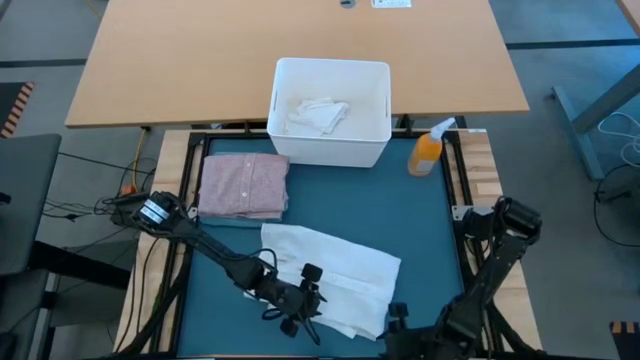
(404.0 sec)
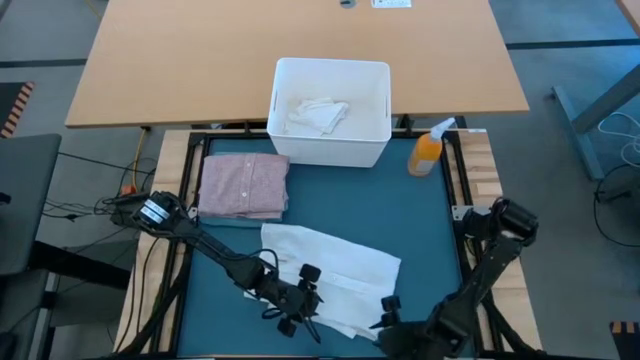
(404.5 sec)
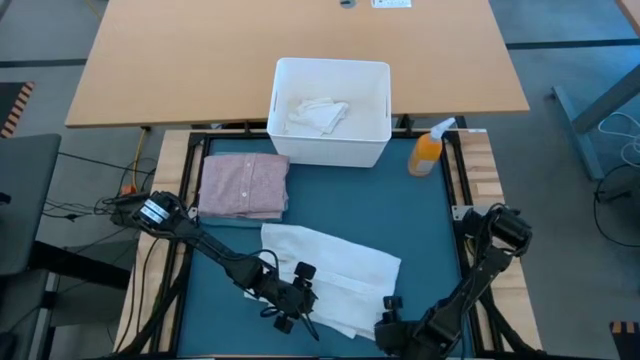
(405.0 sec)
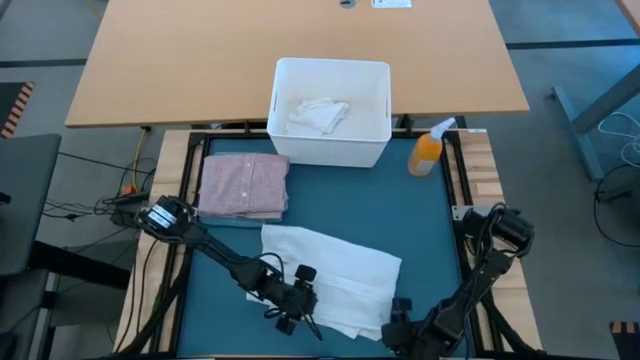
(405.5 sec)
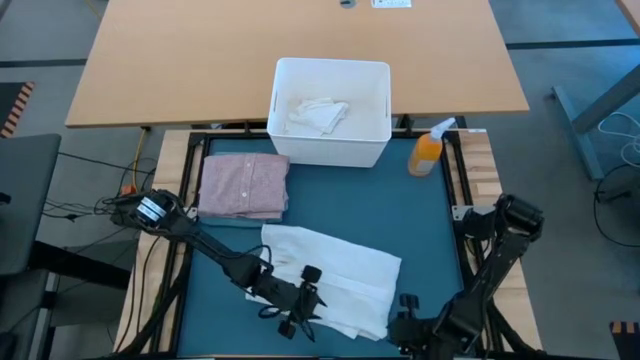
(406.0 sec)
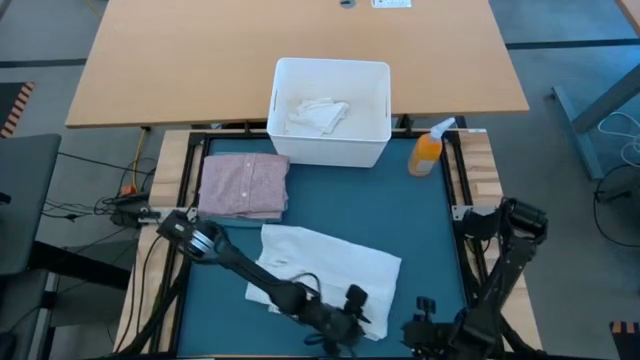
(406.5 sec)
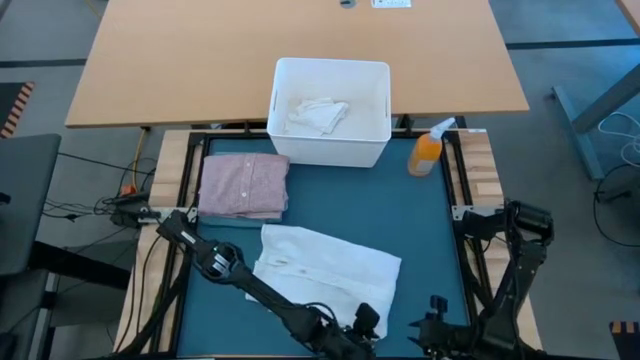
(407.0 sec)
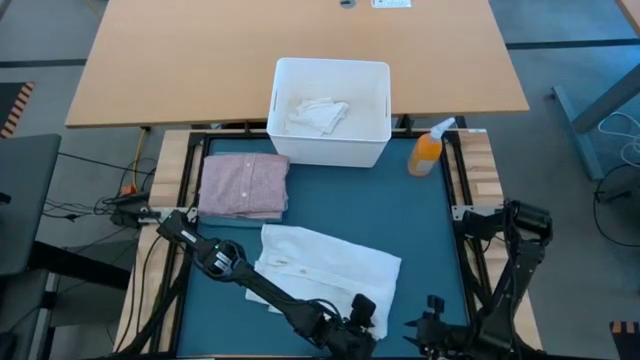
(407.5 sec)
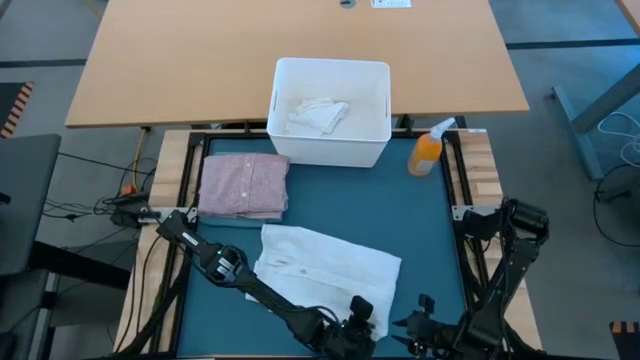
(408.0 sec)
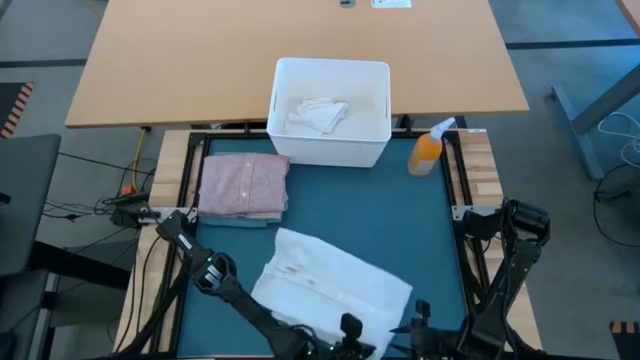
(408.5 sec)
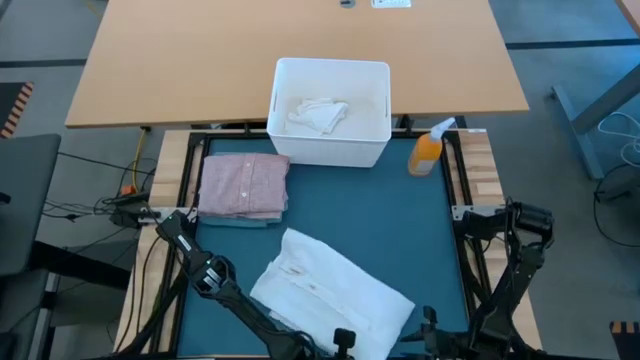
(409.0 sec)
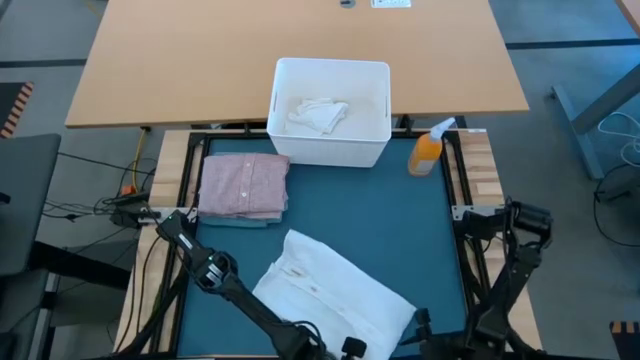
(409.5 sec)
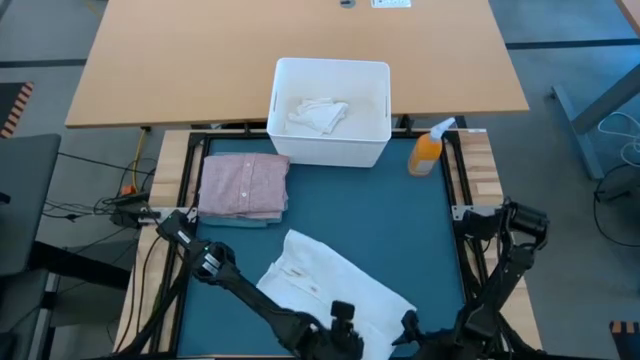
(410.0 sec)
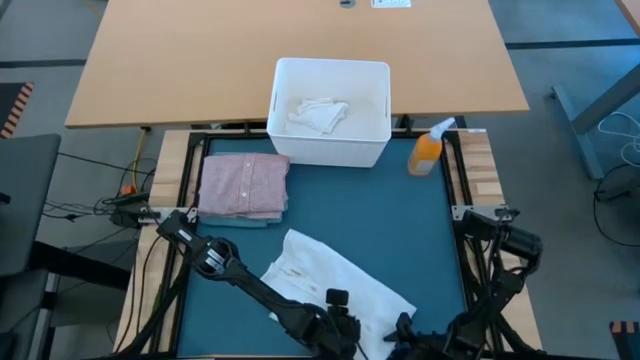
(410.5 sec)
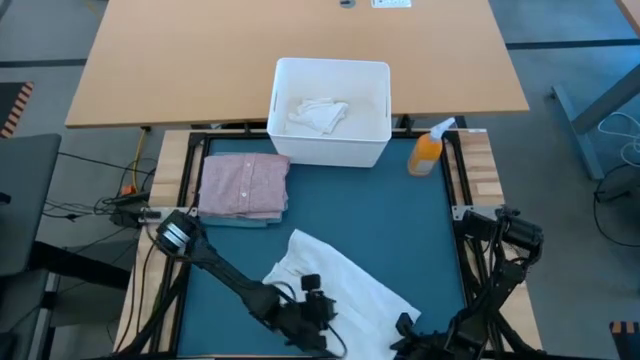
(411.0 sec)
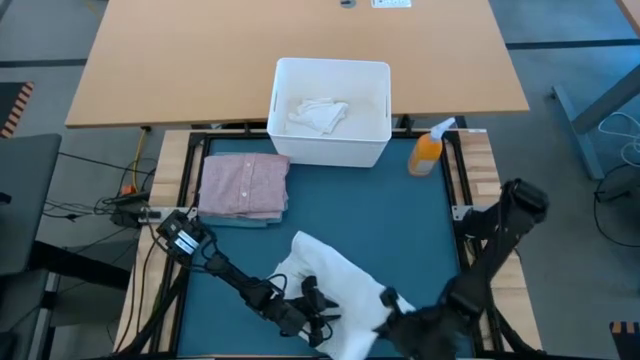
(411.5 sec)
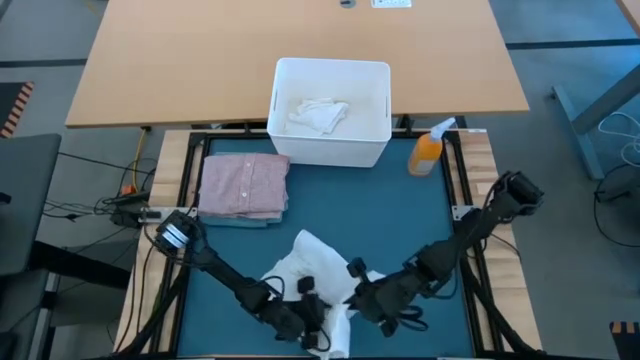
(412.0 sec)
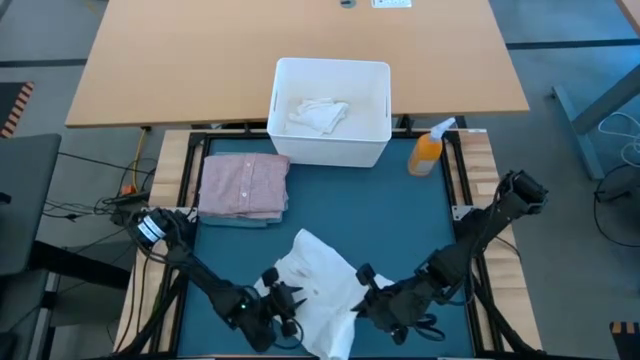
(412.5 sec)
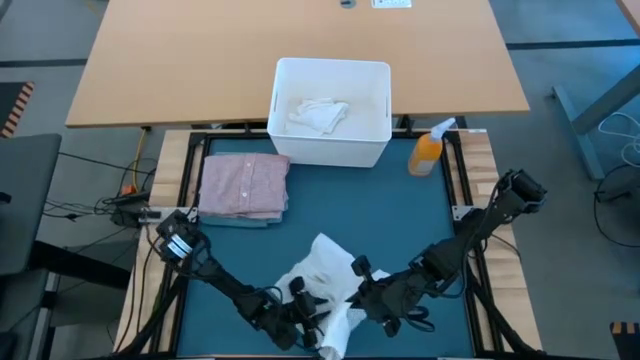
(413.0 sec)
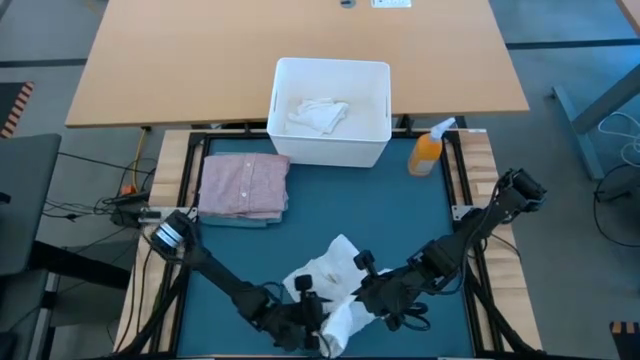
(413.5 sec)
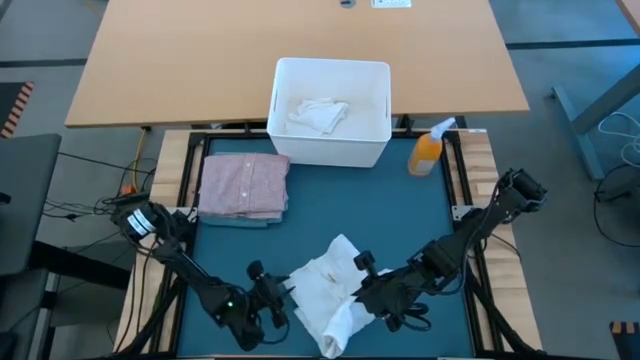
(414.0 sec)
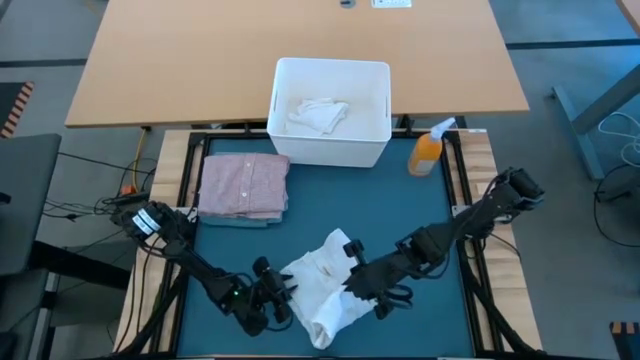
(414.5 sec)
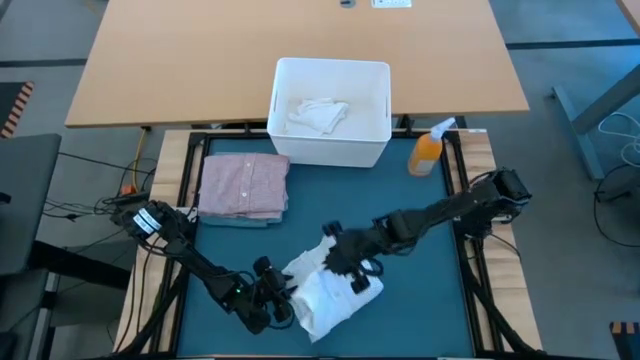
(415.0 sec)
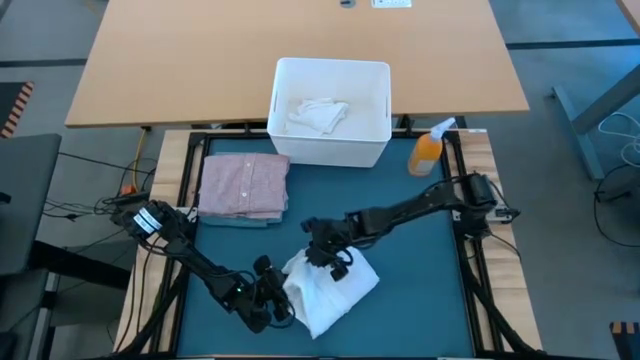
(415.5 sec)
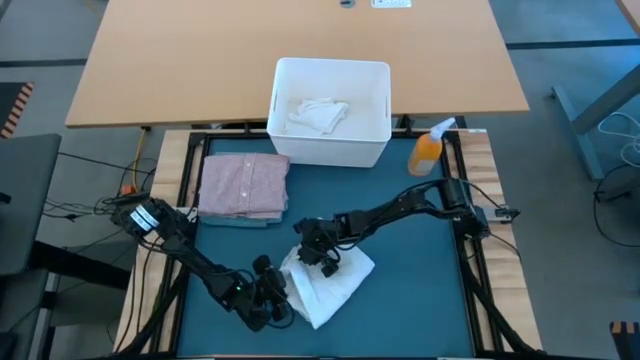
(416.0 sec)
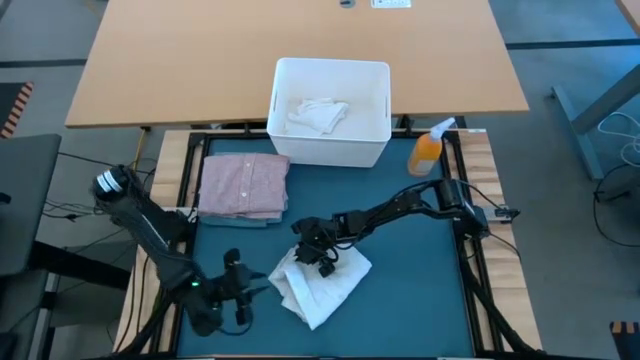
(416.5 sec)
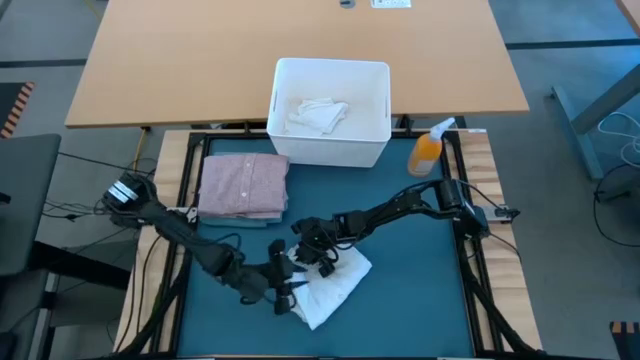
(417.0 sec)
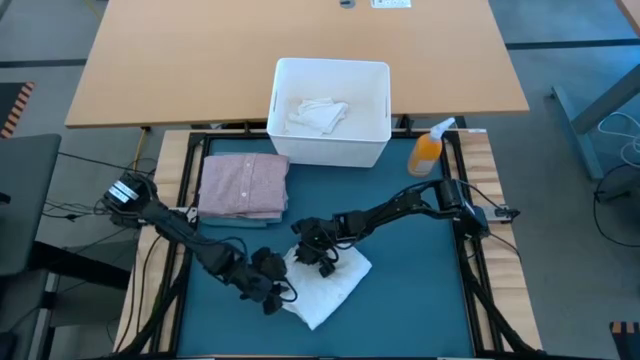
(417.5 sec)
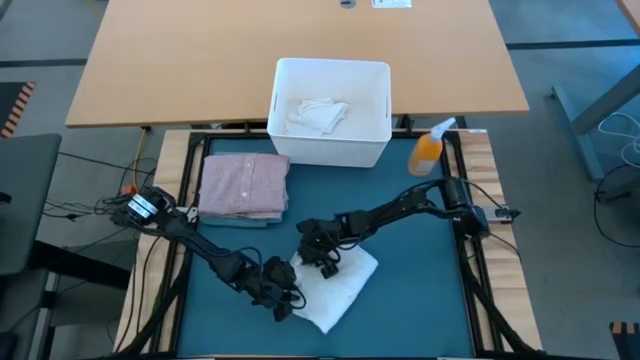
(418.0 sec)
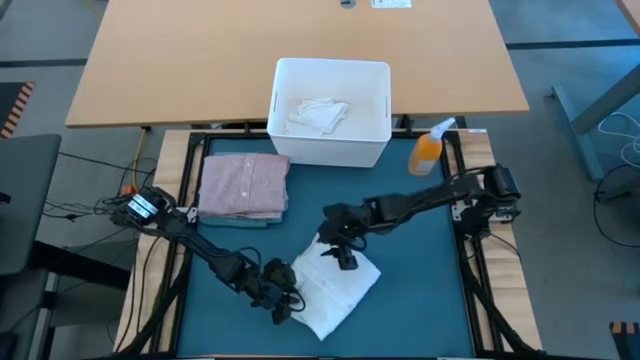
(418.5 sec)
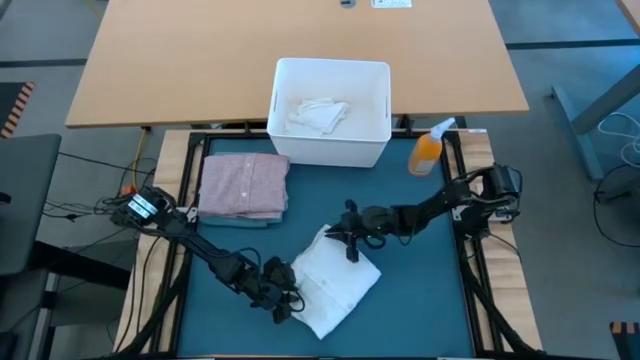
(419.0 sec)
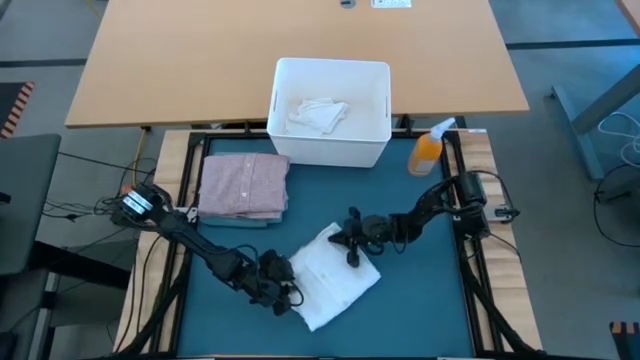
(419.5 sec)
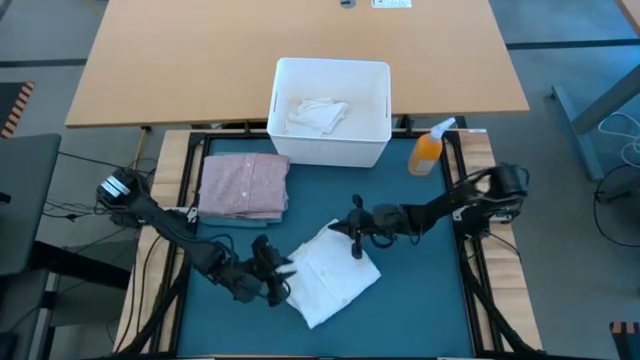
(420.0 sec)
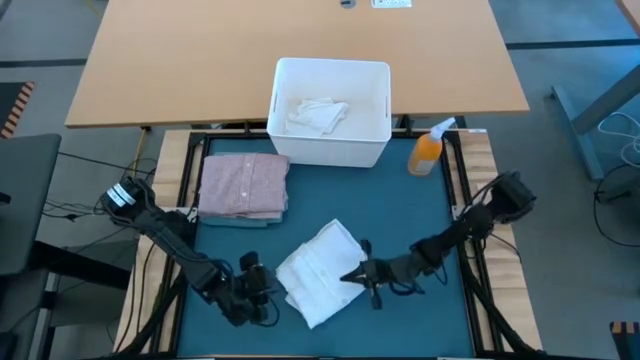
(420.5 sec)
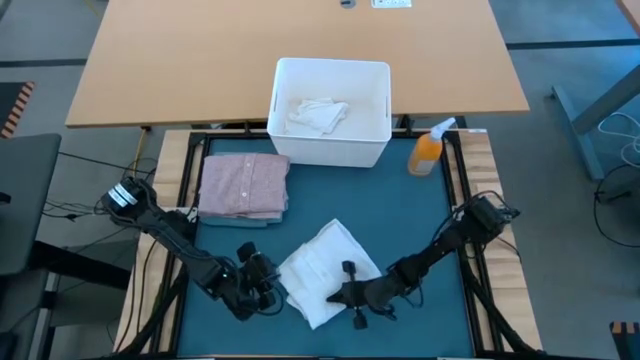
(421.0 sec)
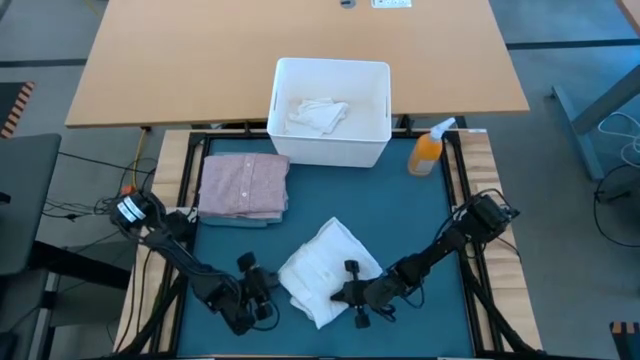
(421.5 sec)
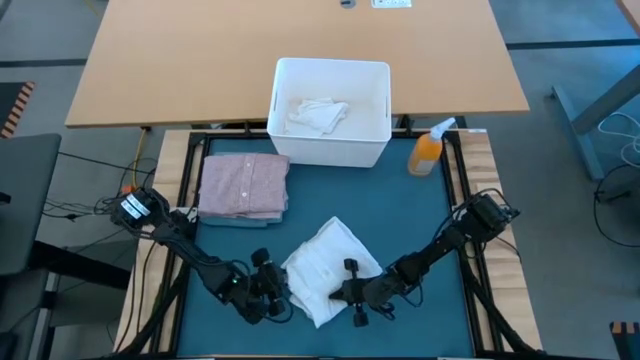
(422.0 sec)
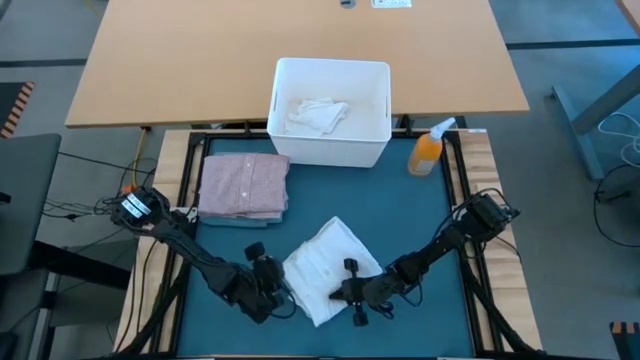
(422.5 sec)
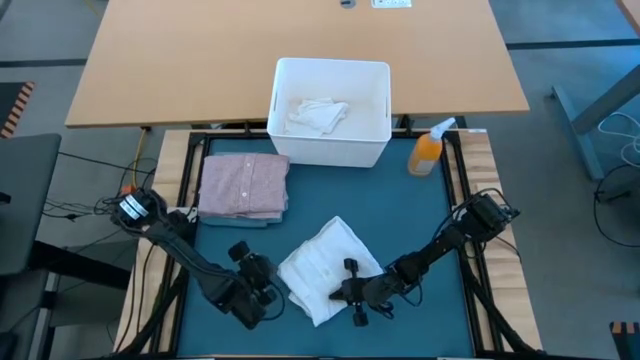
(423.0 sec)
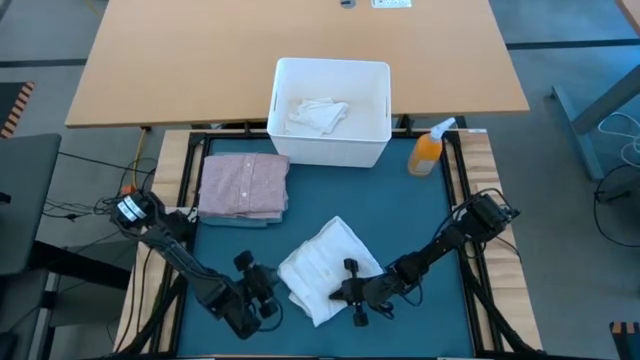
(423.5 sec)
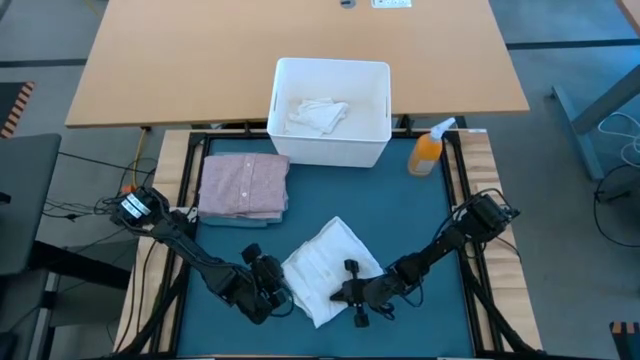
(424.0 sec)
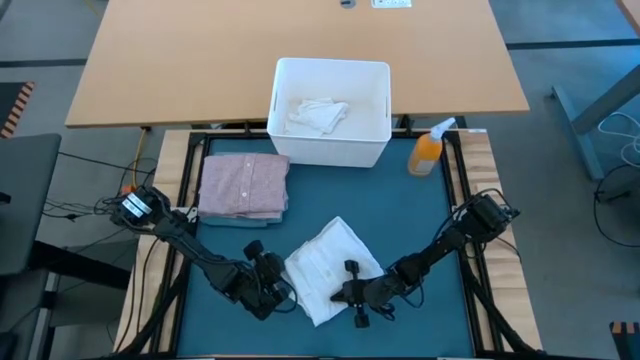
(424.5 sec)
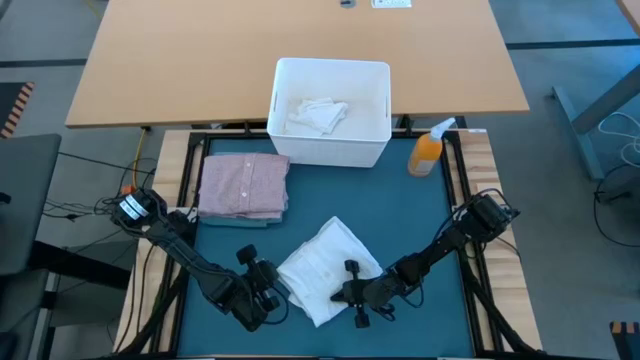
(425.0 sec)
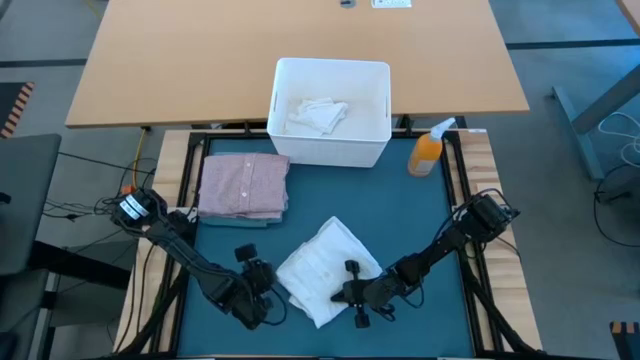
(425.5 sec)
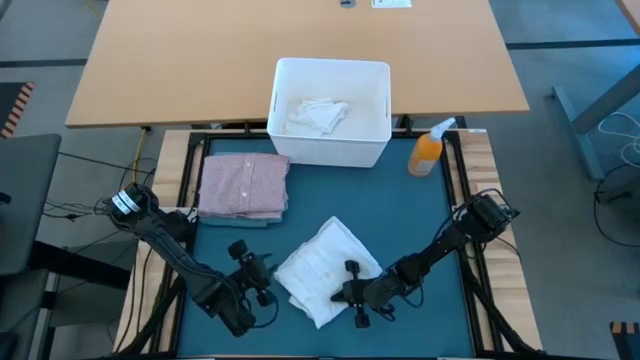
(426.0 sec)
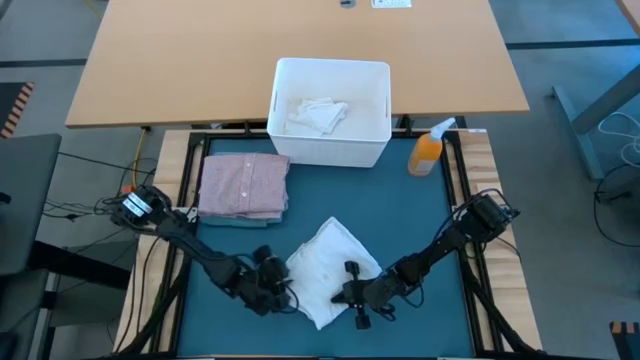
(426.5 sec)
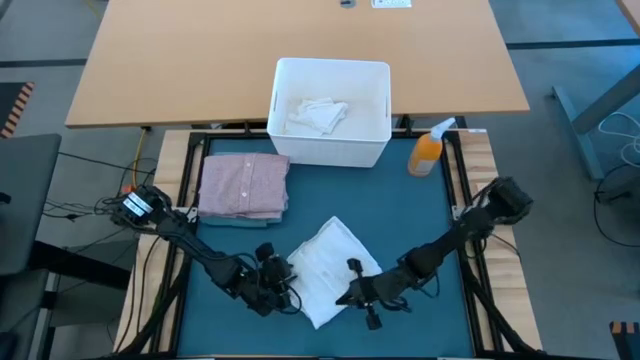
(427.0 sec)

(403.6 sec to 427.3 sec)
Task: Fold Laundry from Bin
Fold the white shirt
